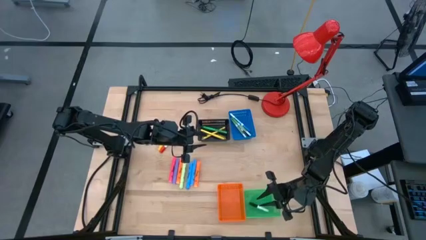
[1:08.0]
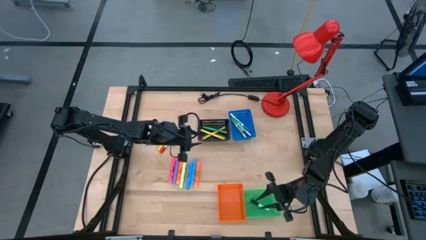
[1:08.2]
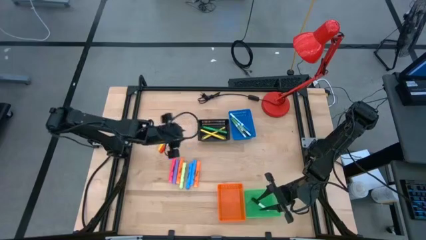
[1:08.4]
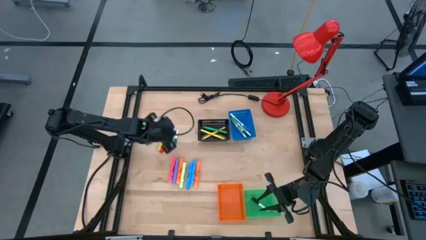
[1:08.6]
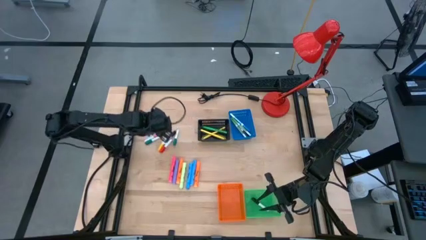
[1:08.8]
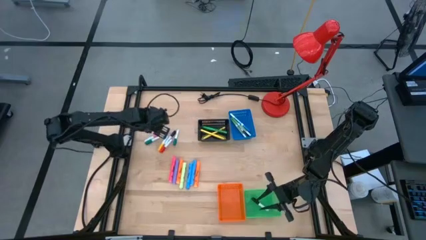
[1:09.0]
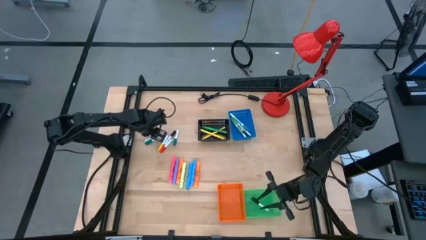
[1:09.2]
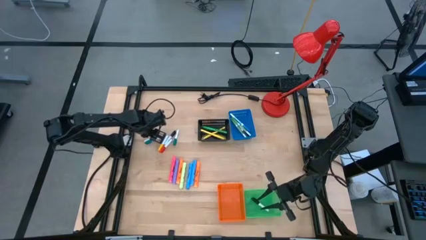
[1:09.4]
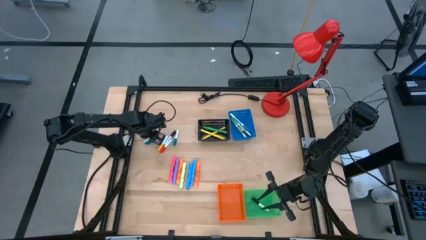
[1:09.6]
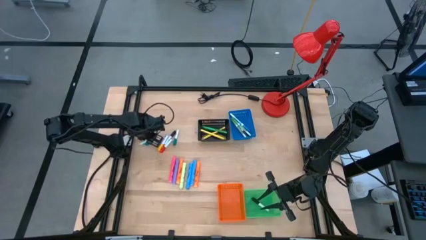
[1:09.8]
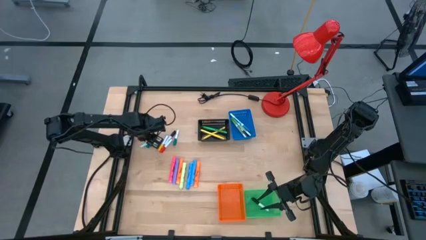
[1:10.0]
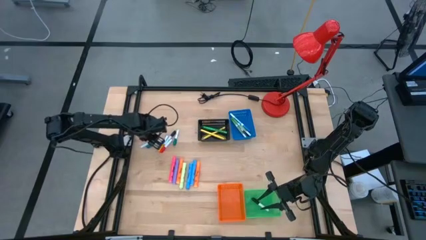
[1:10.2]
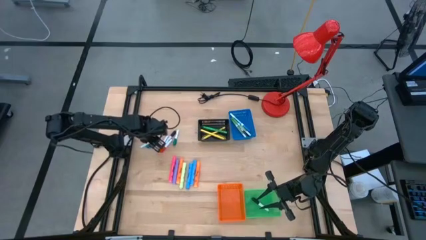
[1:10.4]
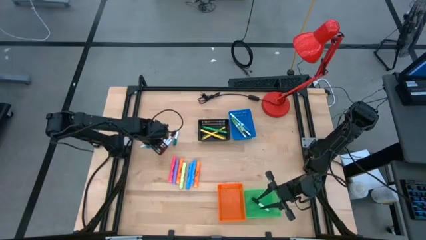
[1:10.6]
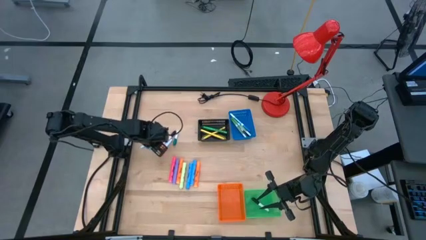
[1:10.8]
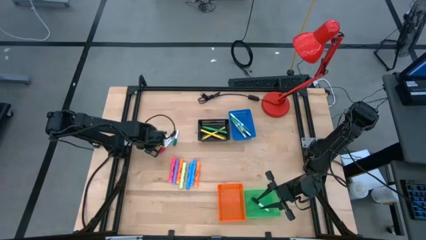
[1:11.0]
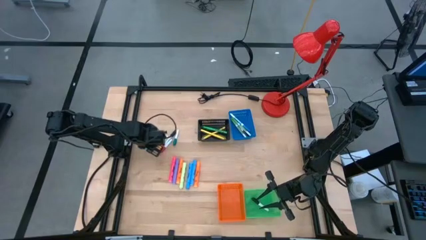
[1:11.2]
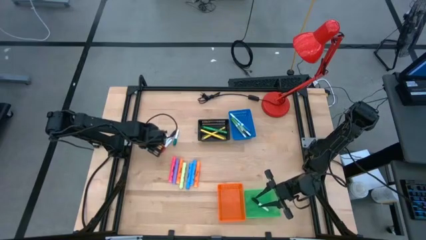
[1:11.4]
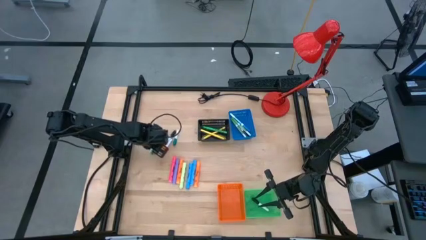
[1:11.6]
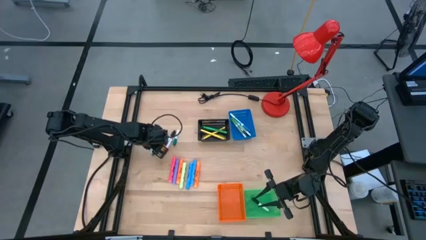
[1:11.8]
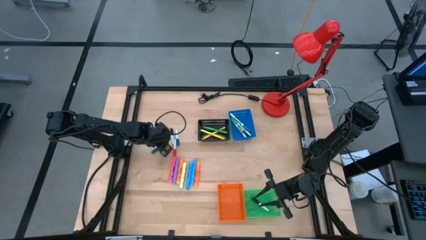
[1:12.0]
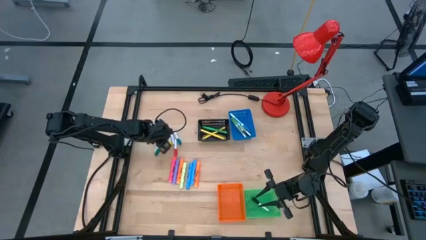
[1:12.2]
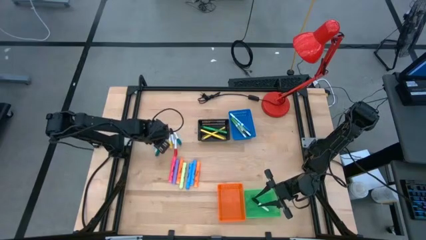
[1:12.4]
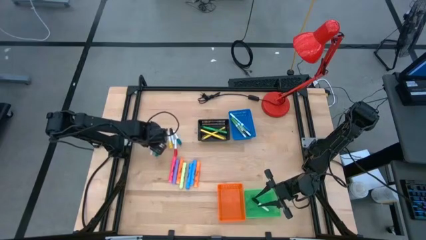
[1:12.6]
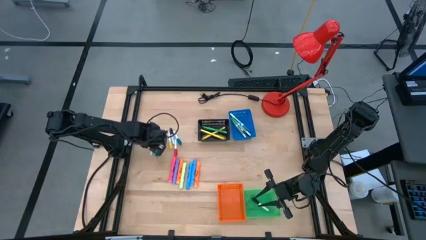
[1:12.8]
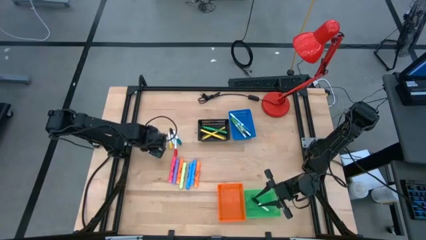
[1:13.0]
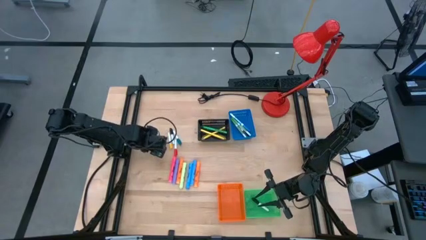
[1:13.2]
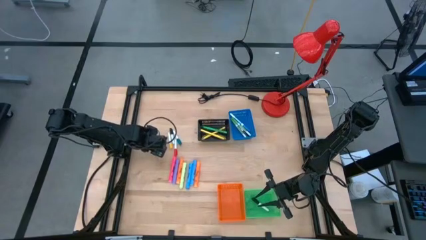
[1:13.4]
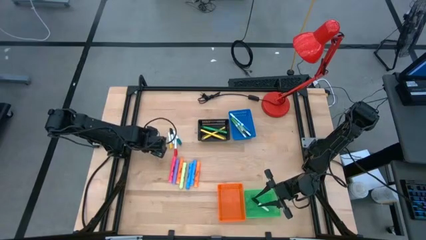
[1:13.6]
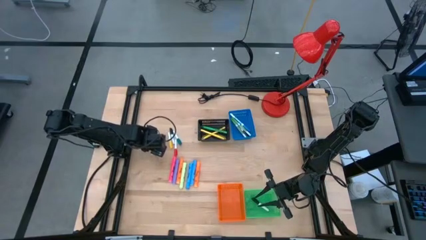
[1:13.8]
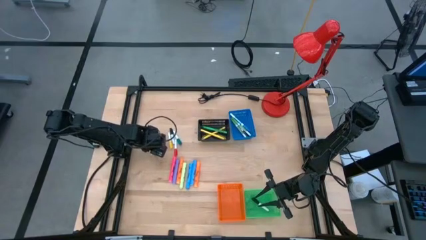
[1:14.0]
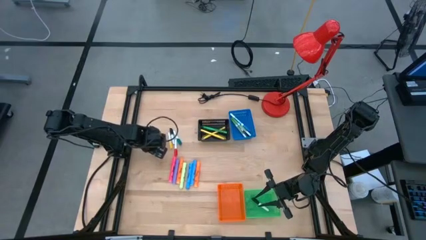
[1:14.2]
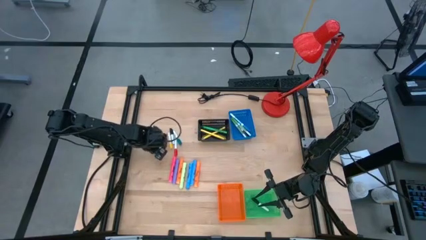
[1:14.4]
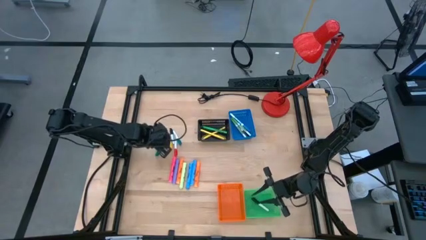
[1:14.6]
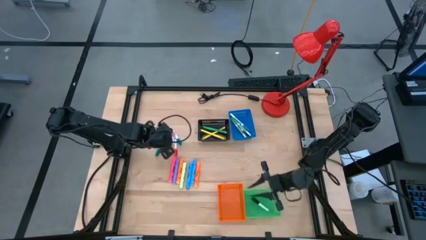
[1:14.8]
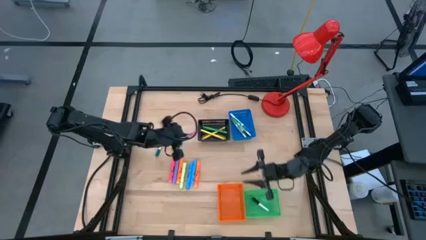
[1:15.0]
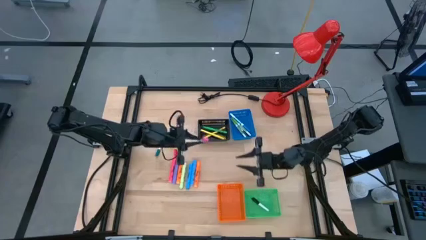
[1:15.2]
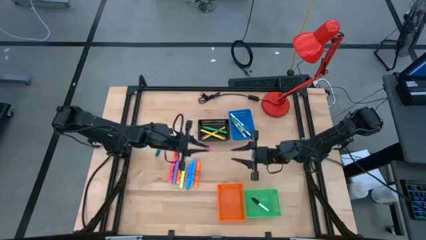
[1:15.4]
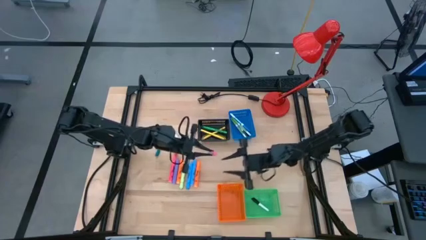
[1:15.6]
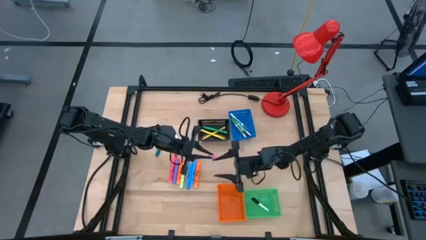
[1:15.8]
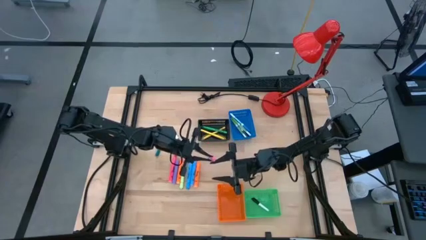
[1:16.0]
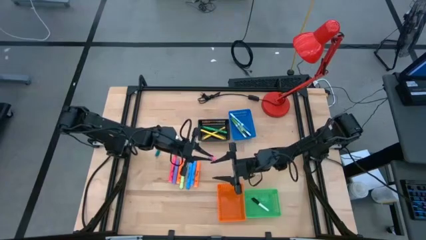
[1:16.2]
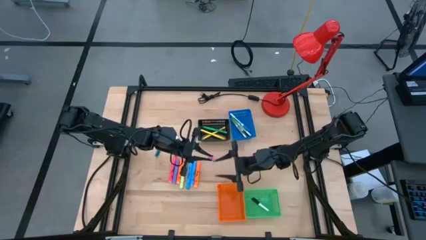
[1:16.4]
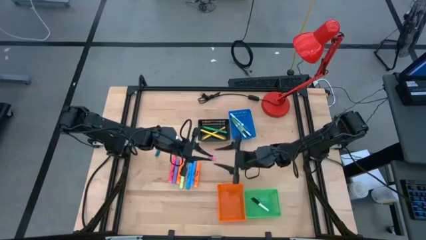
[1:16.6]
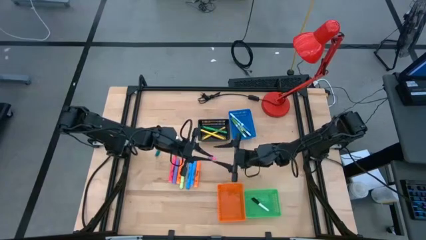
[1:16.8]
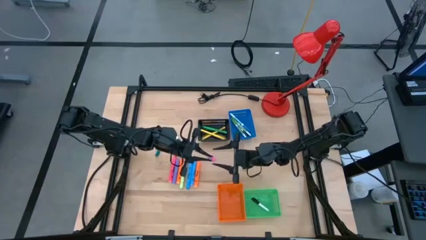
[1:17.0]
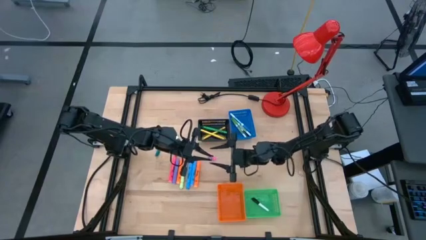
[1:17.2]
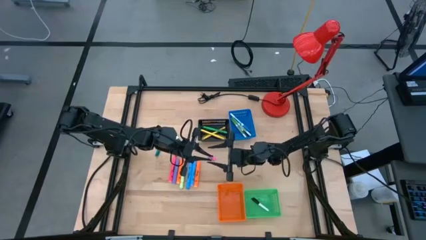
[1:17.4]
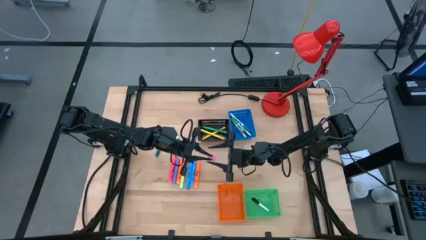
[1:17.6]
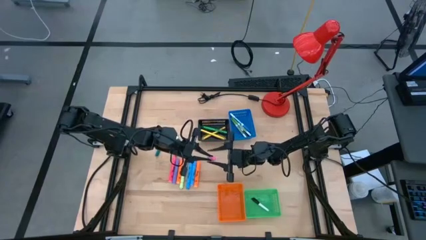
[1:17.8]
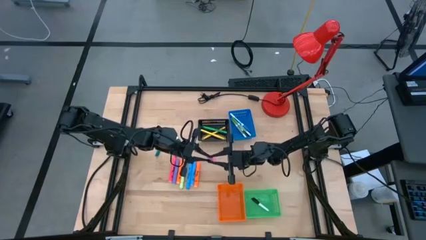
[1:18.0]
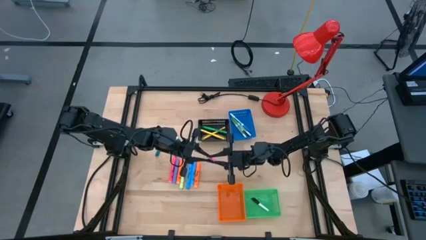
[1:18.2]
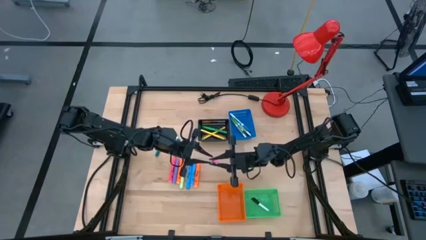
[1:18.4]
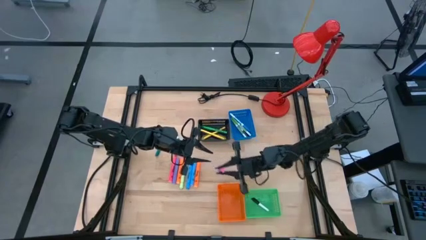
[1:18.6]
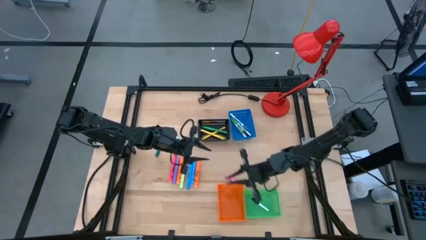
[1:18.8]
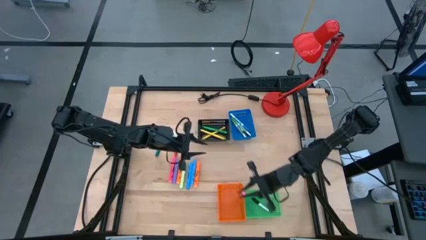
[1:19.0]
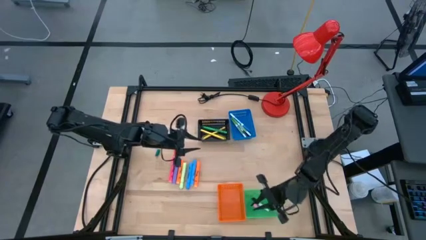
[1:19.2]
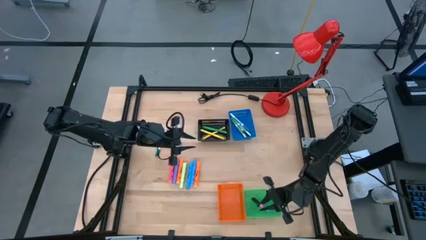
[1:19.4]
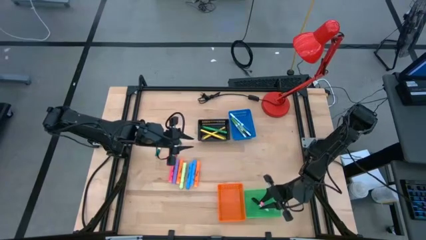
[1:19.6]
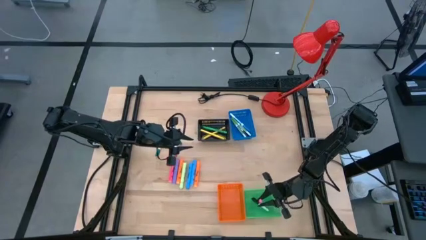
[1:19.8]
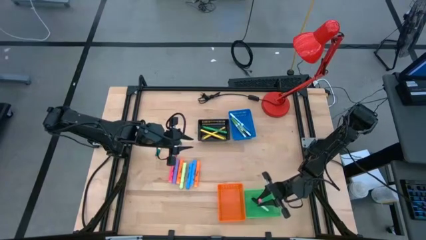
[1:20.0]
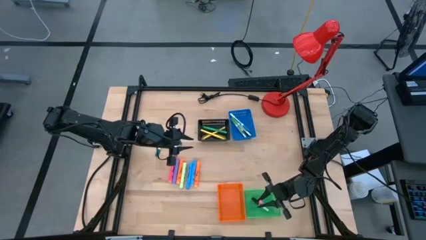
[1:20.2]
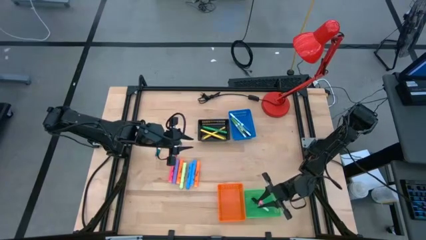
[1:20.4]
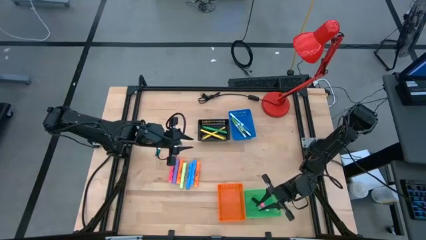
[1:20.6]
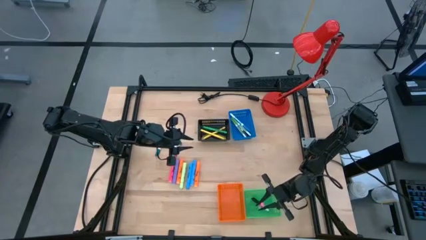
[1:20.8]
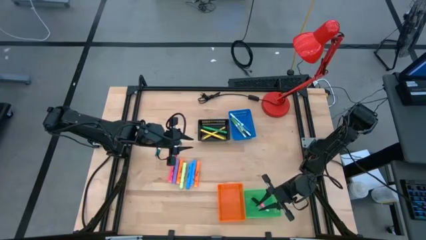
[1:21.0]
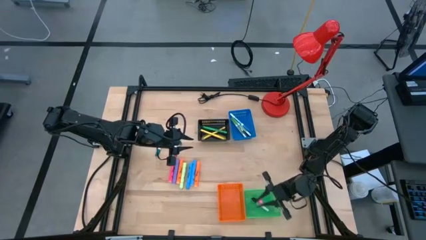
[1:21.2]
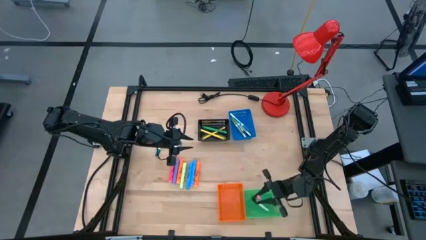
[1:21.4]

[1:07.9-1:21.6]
Task: Pick & Place Markers
Put the pink highlighter pen into the green bin

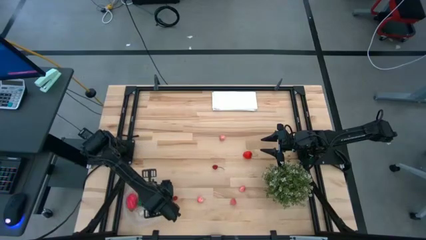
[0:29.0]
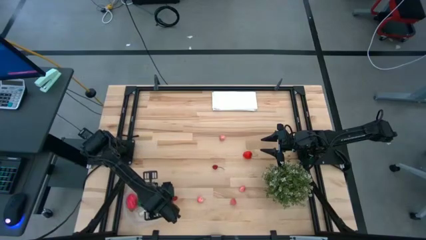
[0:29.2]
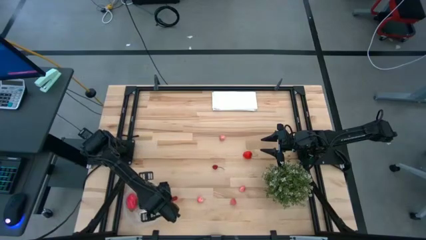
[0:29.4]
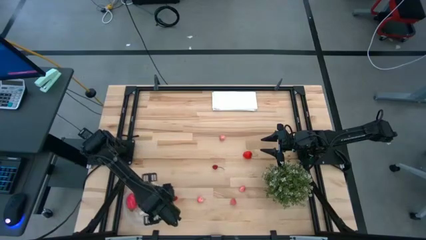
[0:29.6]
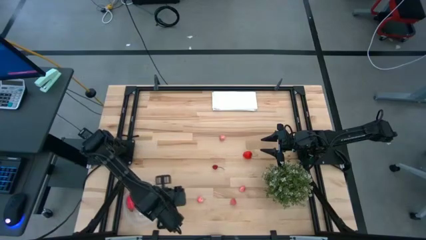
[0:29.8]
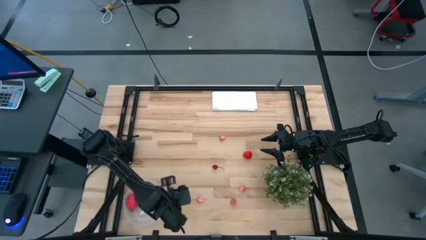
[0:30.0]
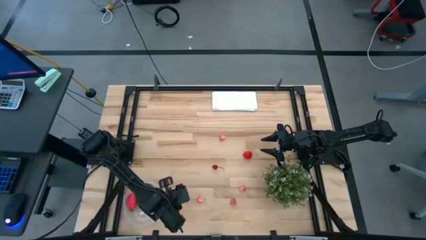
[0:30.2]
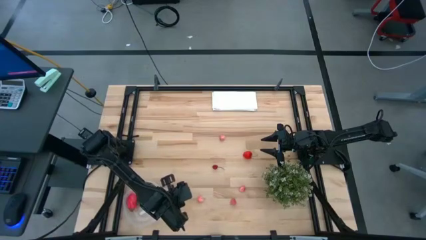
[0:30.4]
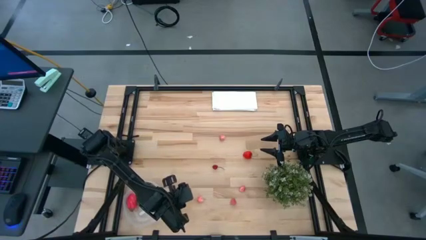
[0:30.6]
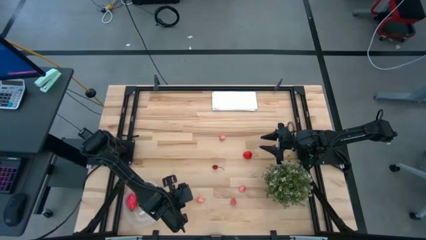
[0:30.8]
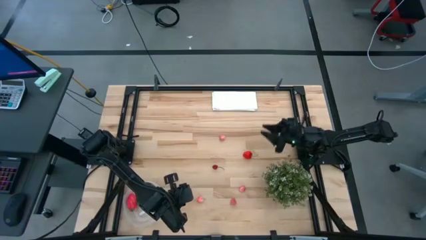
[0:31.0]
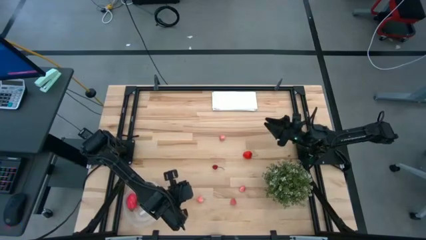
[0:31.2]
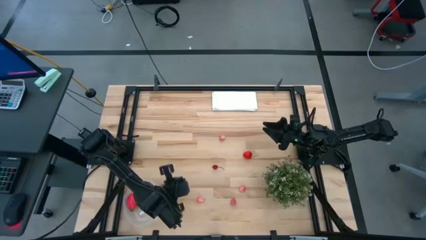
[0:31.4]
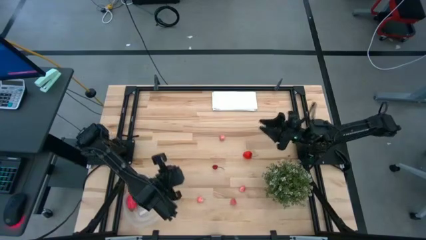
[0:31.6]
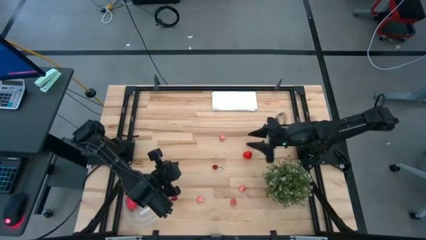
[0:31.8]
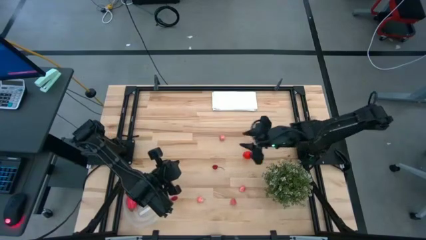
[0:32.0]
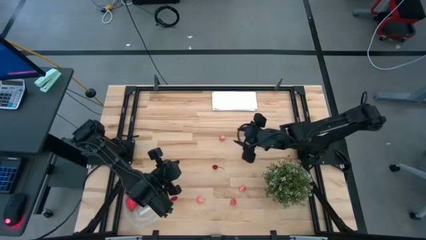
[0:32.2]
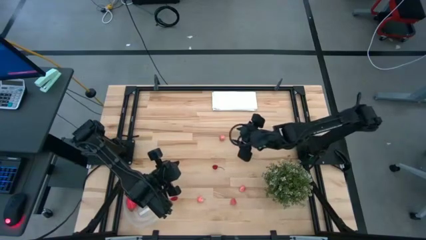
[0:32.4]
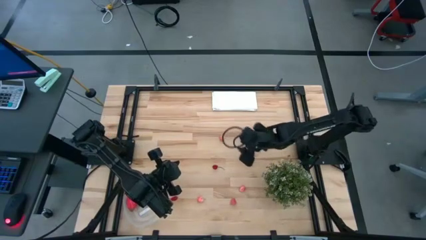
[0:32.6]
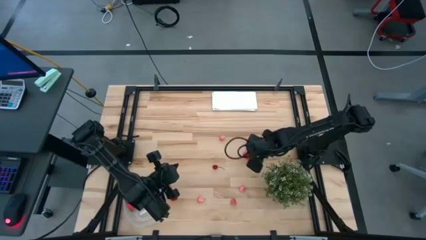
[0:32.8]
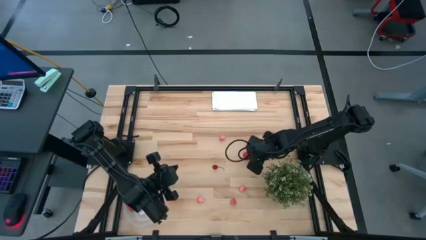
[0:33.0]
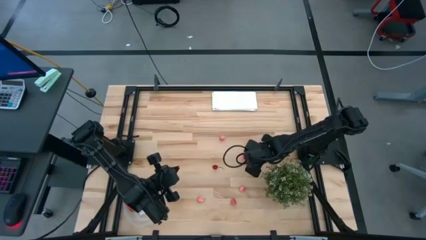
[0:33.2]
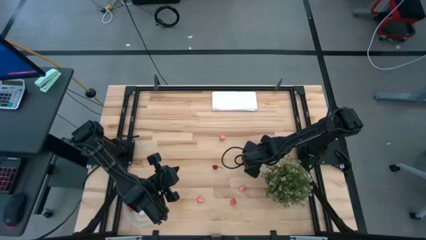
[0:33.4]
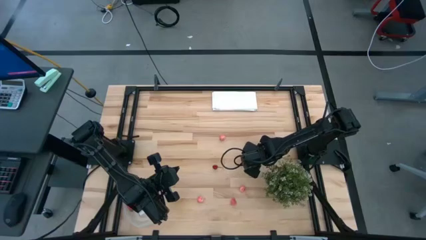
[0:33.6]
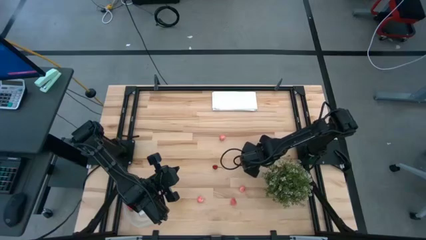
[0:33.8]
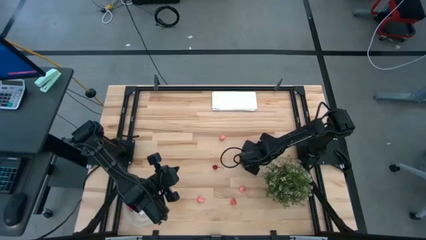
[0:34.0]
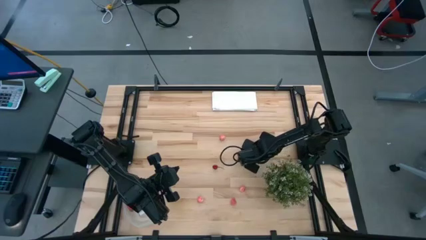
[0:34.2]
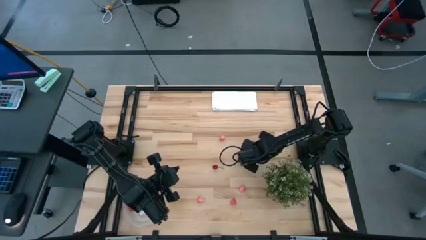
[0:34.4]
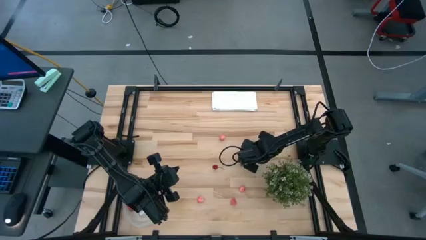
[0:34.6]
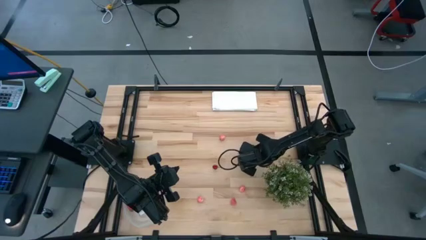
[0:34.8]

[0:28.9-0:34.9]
Task: Pick and placing Produce into tupperware
Put the strawberry into the transparent plastic container
